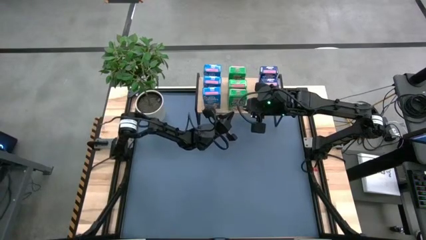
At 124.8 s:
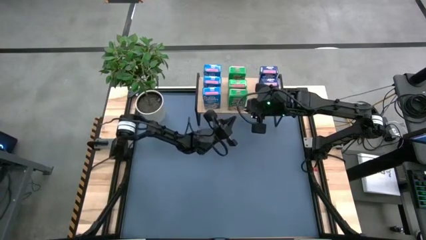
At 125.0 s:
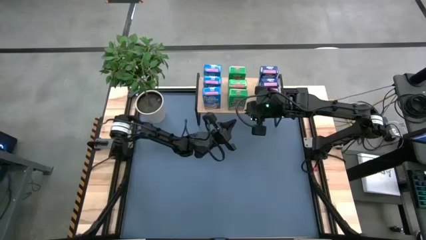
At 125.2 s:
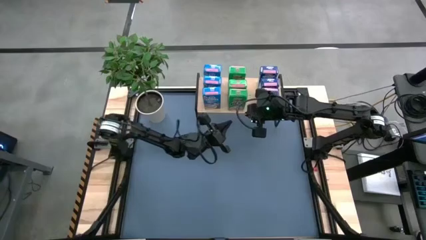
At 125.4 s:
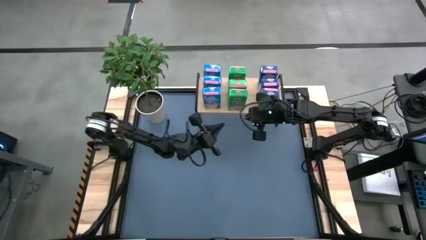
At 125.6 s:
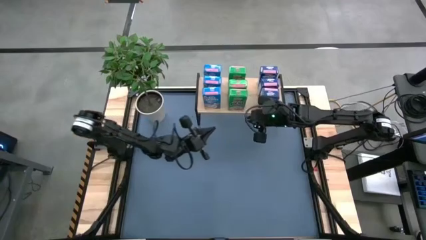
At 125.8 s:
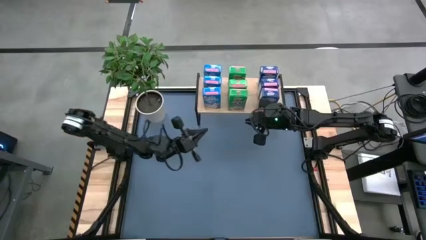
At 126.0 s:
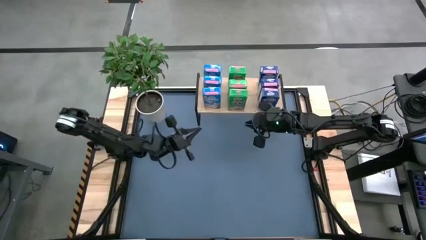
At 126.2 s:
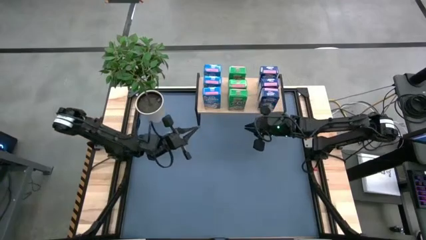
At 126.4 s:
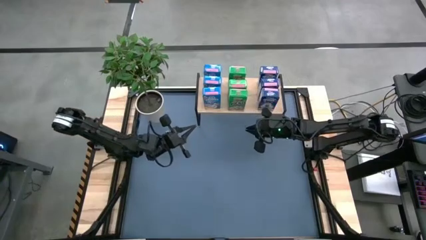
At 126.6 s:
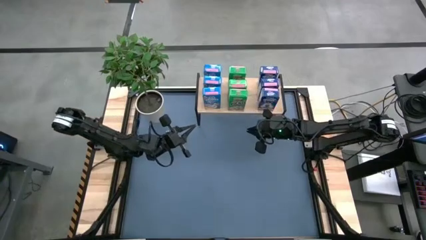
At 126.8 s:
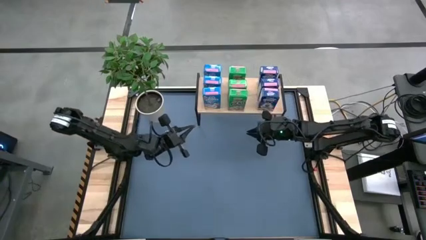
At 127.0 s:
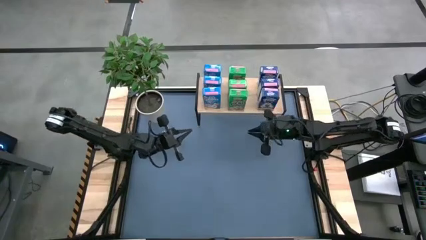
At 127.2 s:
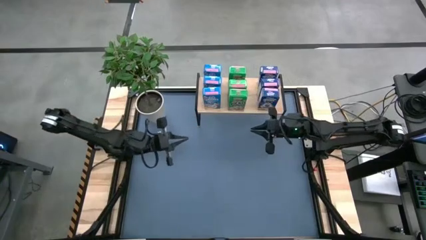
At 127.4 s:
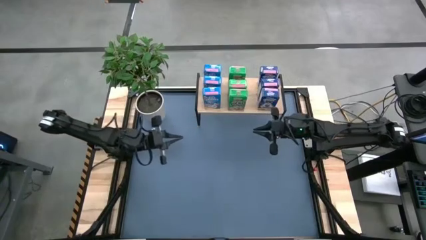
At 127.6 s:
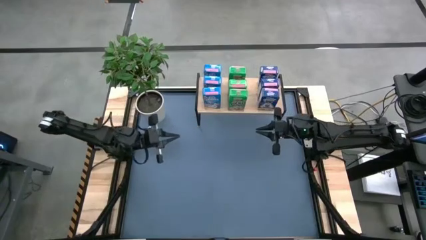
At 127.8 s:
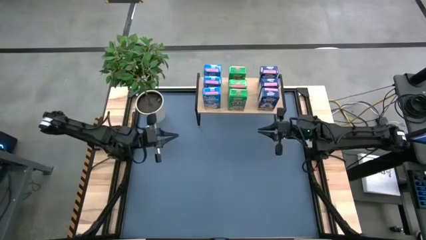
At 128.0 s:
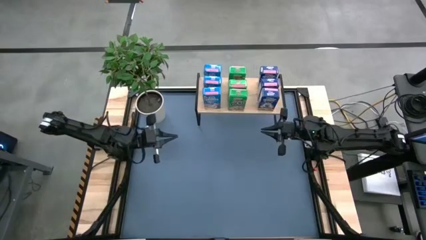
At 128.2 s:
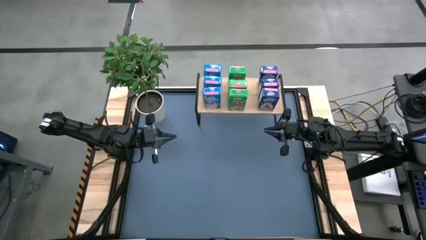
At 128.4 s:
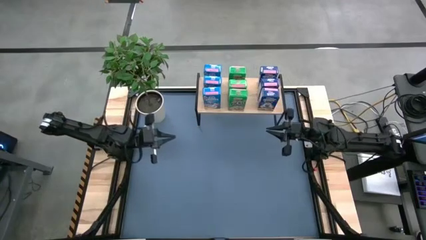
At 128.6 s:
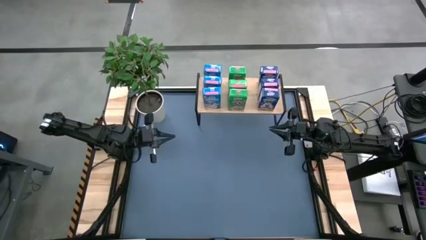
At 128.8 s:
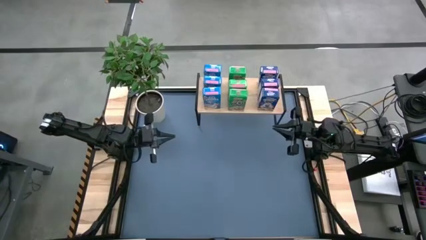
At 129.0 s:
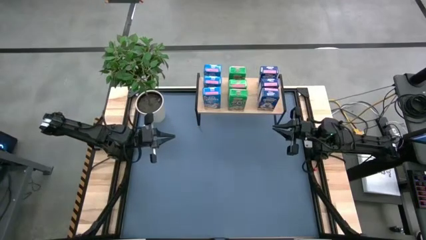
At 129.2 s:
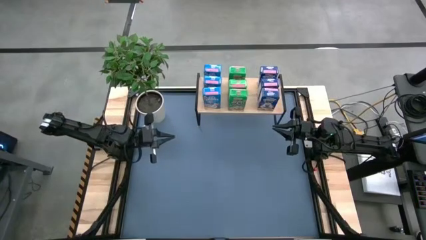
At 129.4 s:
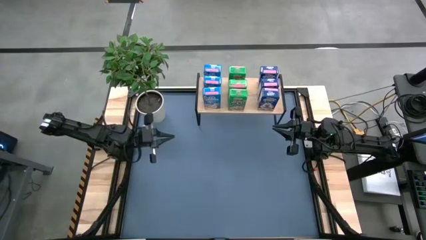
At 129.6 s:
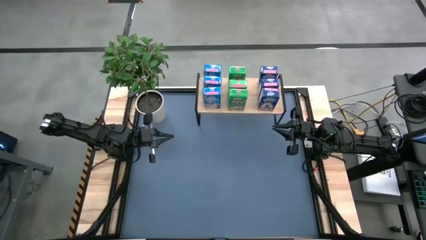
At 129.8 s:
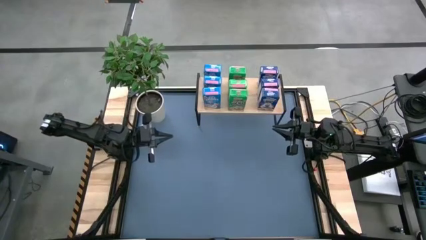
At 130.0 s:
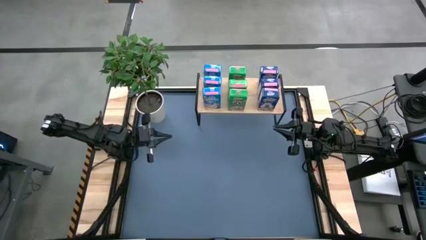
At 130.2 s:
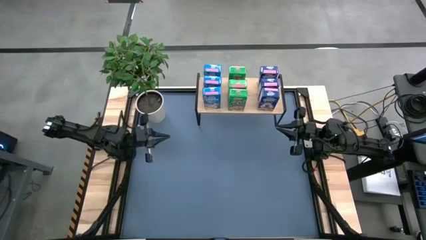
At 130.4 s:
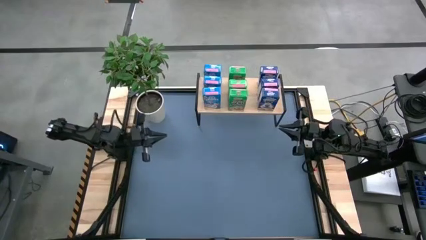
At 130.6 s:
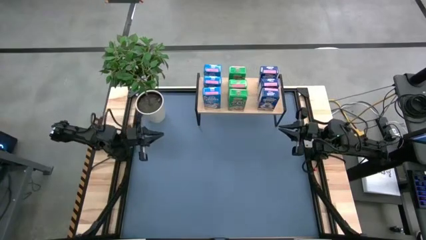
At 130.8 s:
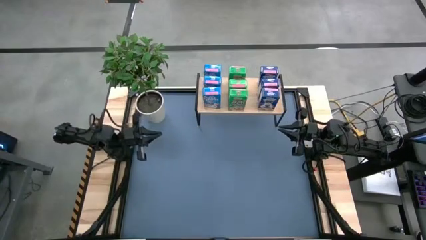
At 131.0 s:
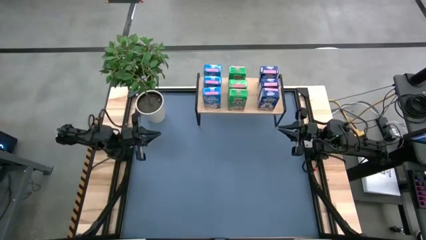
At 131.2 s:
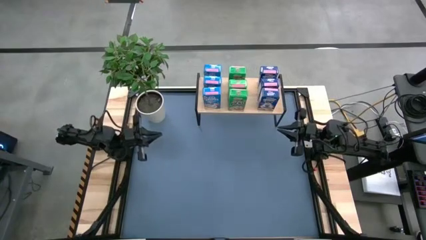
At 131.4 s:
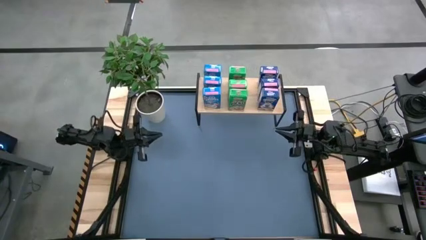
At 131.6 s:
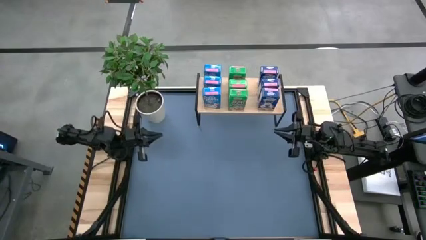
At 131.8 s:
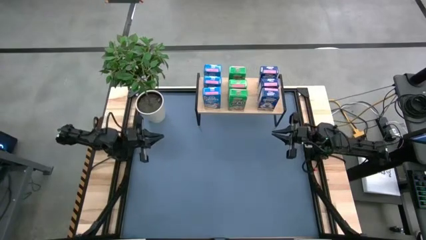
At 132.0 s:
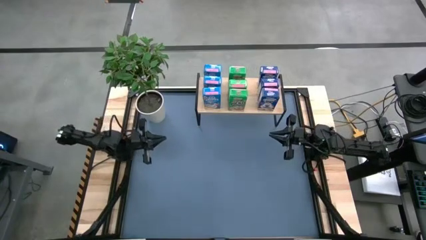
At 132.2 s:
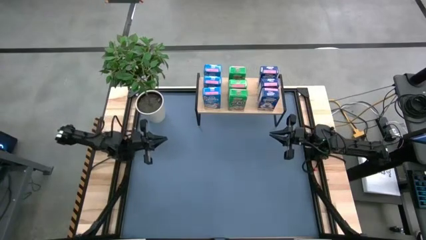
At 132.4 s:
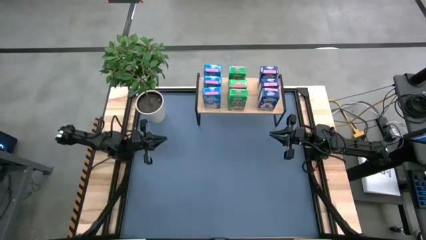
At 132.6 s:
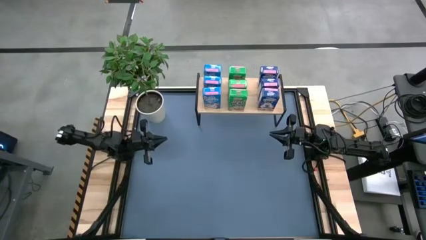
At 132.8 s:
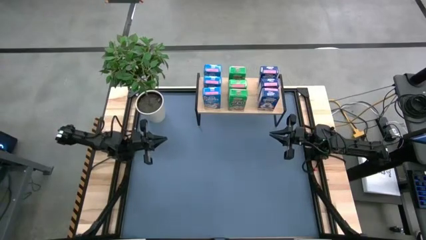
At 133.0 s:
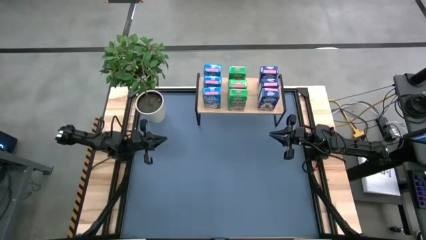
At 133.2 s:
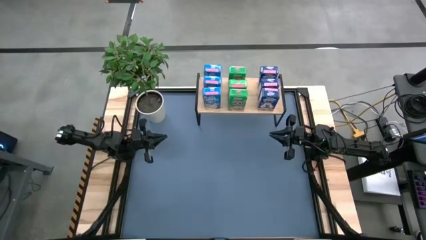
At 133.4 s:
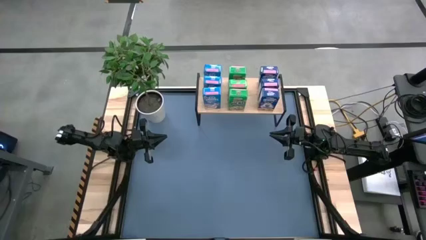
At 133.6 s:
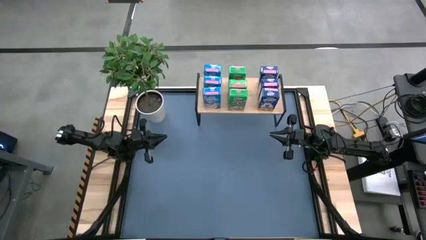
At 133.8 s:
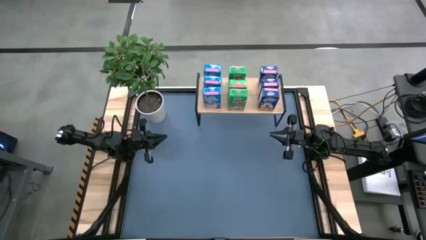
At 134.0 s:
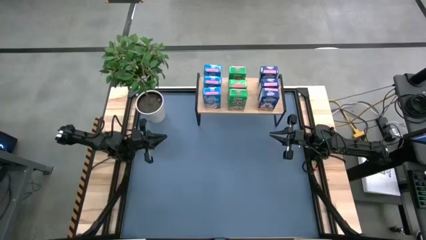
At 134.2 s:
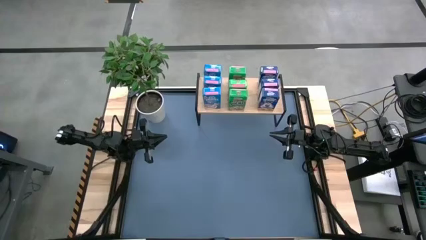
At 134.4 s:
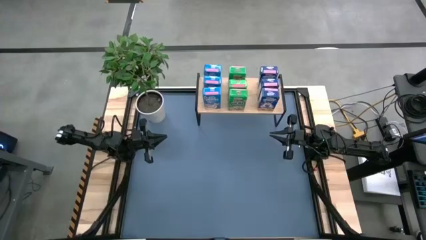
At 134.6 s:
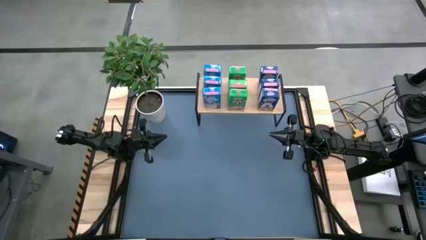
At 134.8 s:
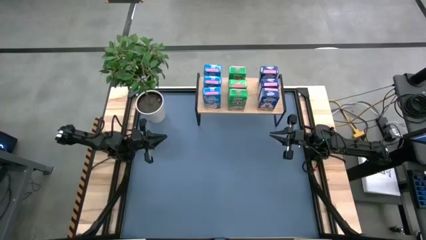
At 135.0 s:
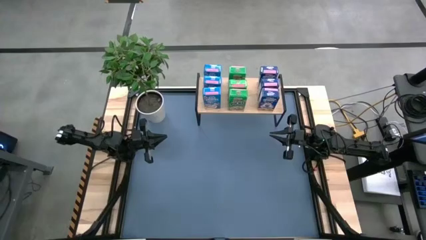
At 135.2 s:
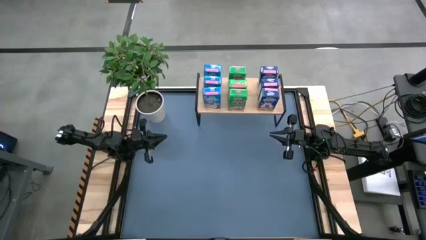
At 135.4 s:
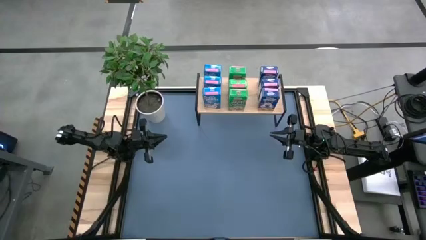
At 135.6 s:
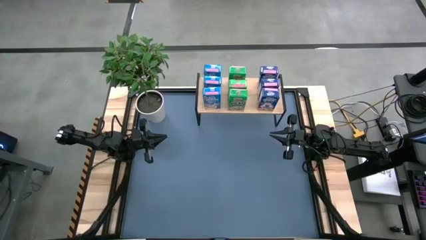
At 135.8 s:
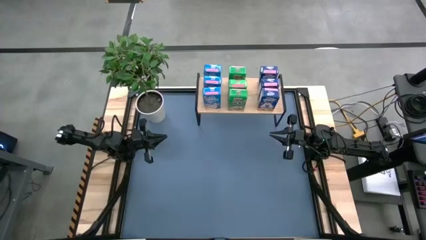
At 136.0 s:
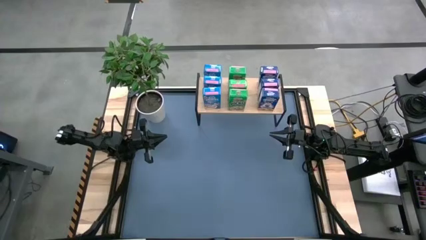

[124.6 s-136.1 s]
Task: Stack cereal on shelf
Return to Home Position

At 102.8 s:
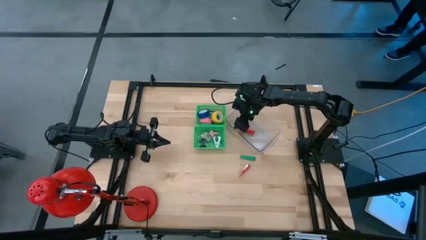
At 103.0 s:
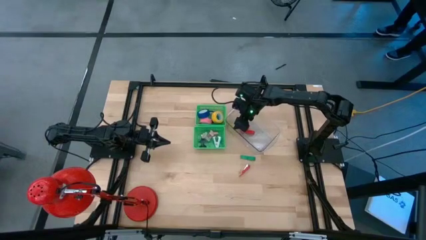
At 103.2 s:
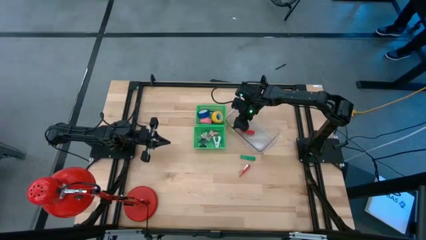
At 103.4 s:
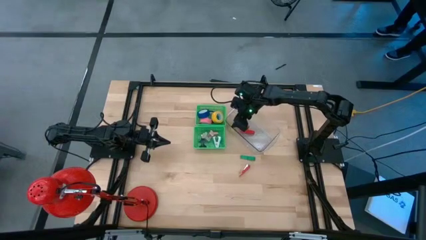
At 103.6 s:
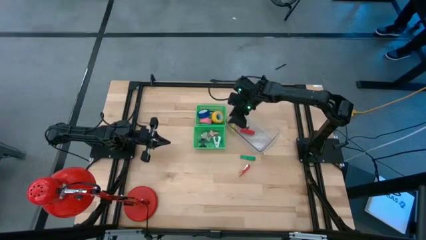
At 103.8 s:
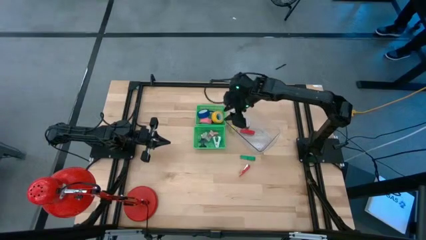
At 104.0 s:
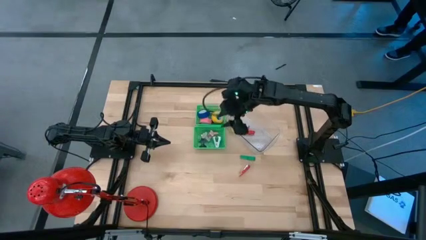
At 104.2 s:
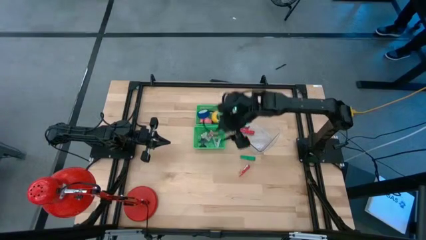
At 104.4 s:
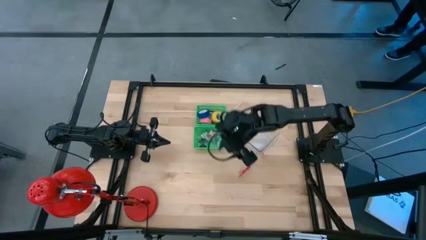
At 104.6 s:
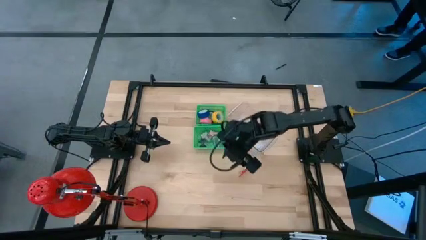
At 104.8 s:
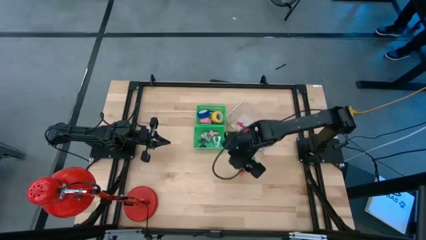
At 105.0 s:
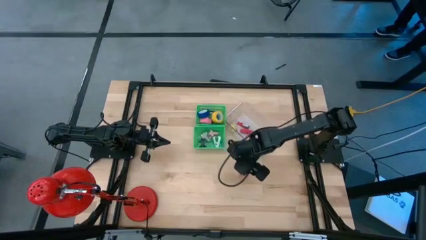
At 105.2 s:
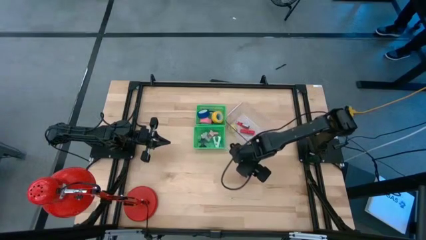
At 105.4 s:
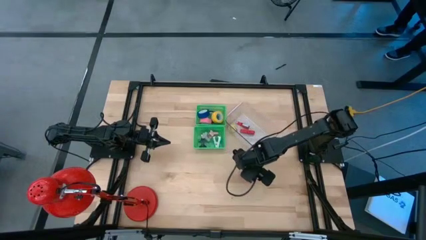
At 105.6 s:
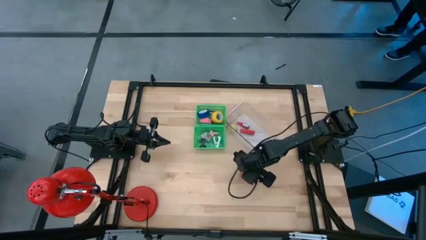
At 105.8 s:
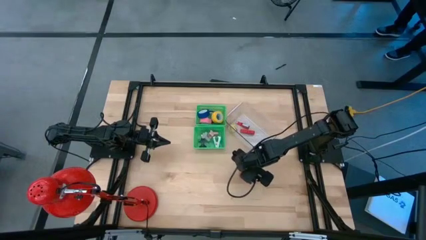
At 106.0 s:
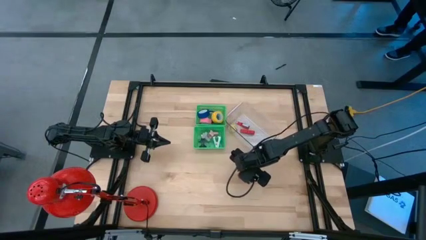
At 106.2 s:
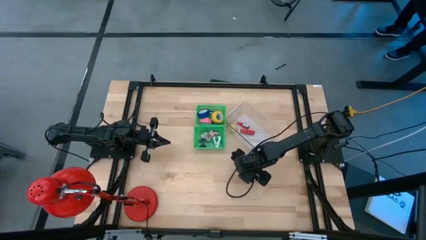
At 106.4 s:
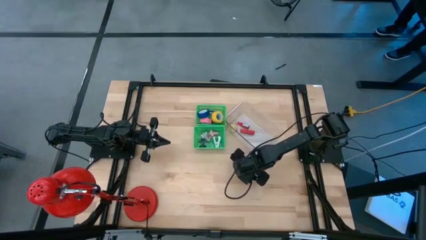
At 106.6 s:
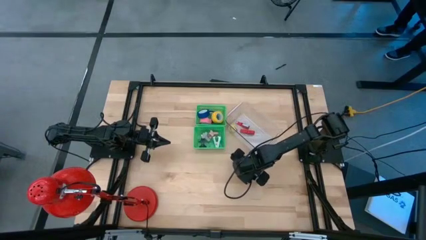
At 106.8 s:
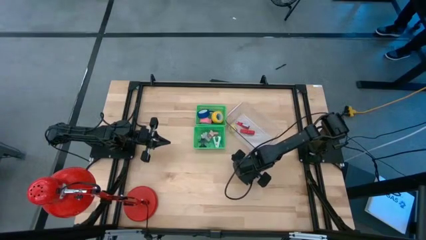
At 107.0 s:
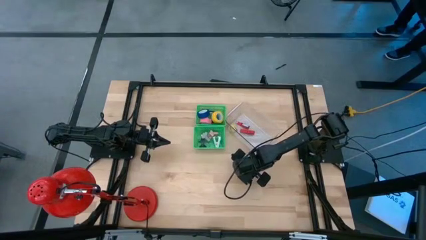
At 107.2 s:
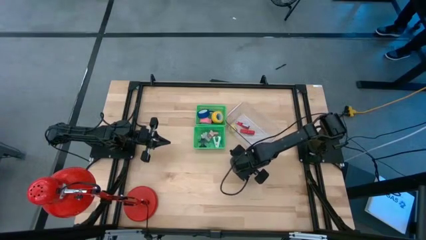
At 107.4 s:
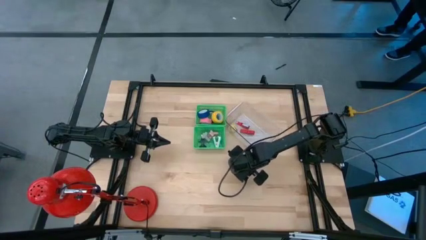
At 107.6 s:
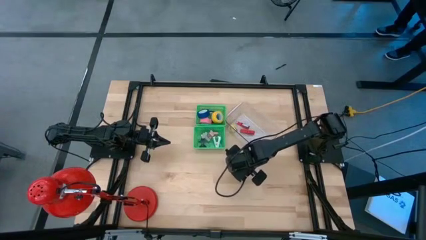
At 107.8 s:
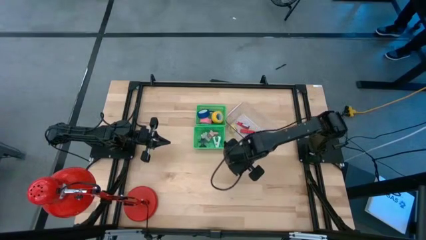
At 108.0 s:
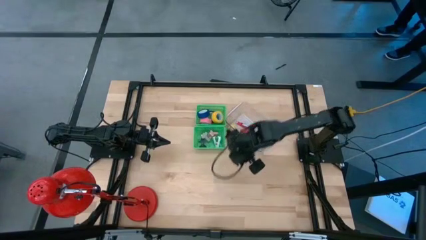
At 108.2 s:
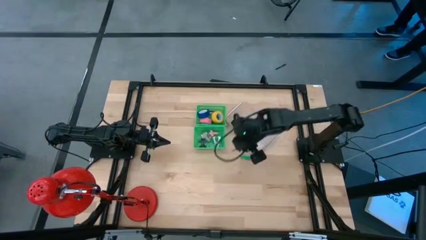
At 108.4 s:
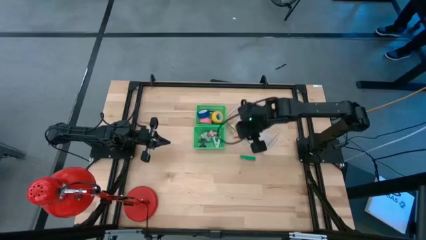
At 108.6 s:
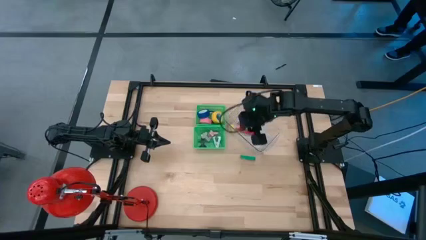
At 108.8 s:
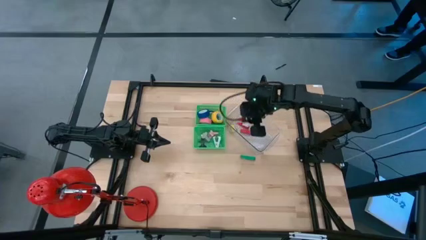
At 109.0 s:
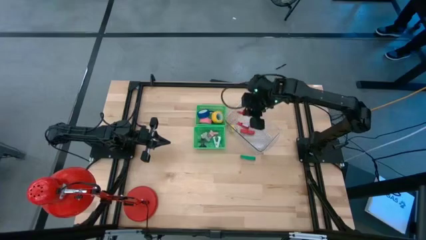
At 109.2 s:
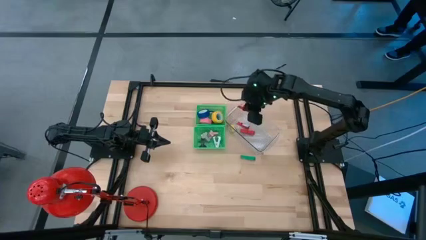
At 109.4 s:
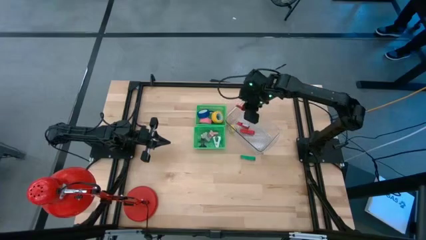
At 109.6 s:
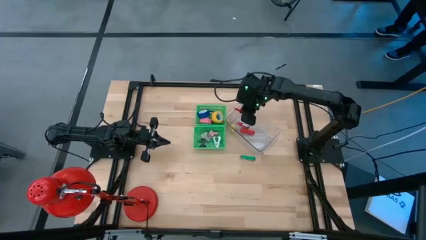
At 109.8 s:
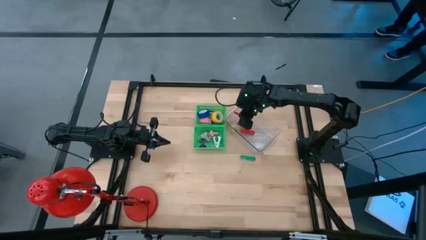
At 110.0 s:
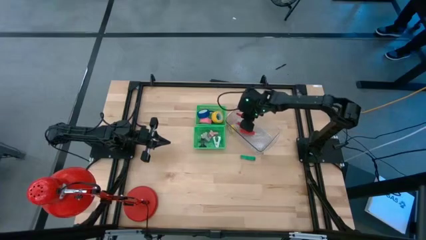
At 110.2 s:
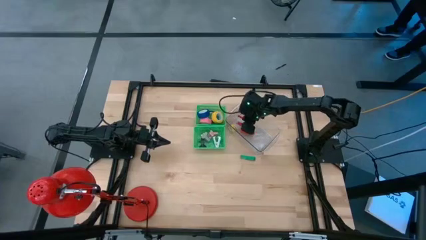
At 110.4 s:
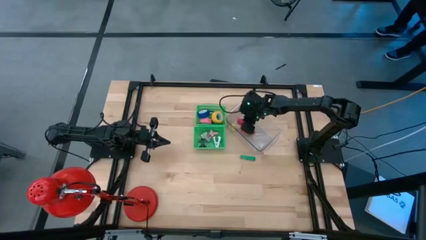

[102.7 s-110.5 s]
Task: Pick and place Stapler, Stapler remover, tape
Put the red stapler into the transparent bin
